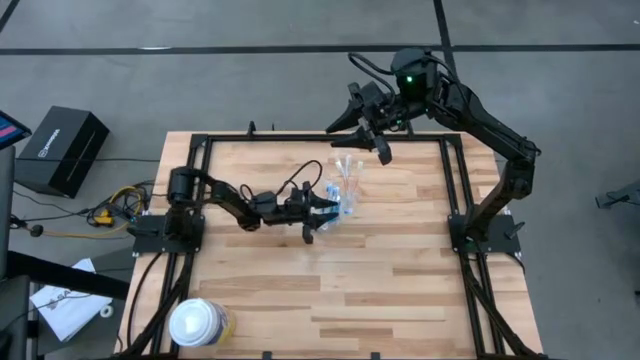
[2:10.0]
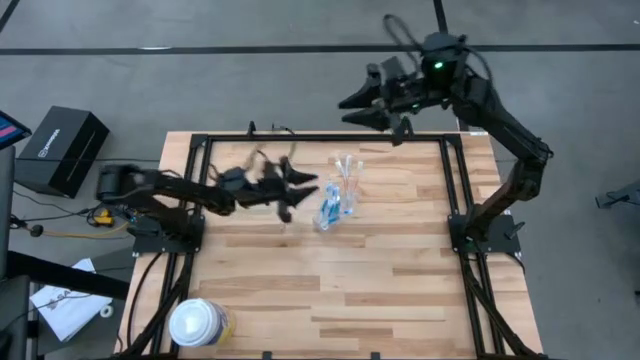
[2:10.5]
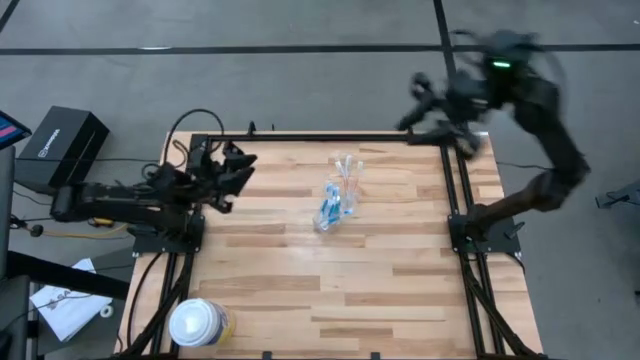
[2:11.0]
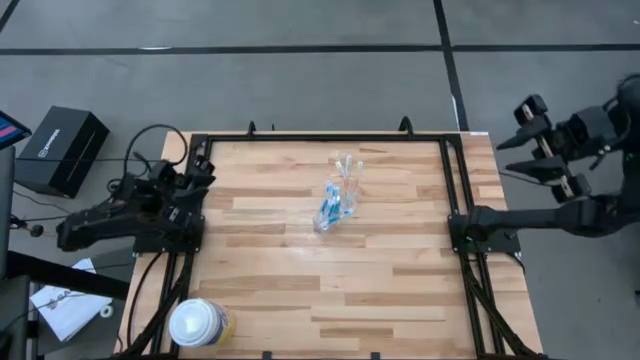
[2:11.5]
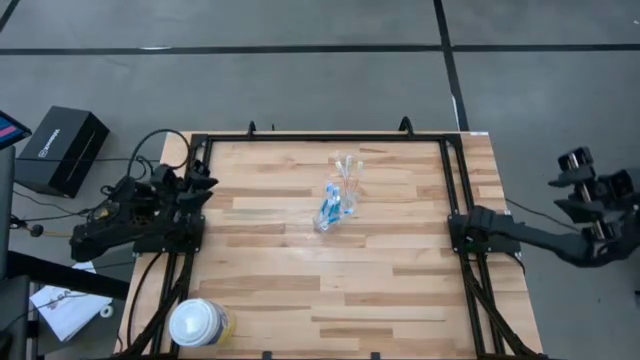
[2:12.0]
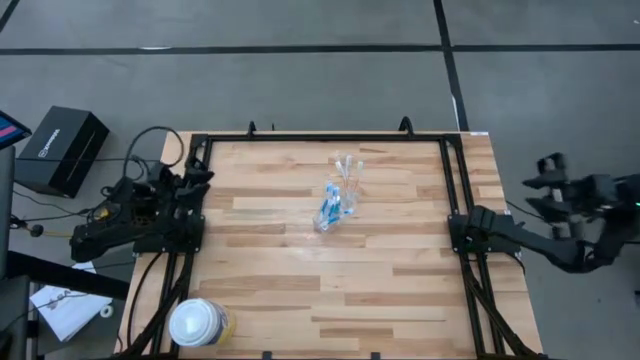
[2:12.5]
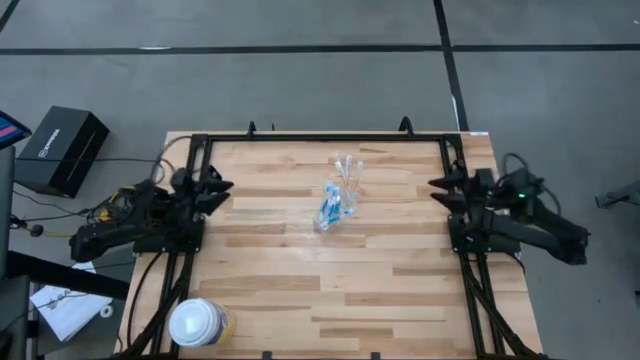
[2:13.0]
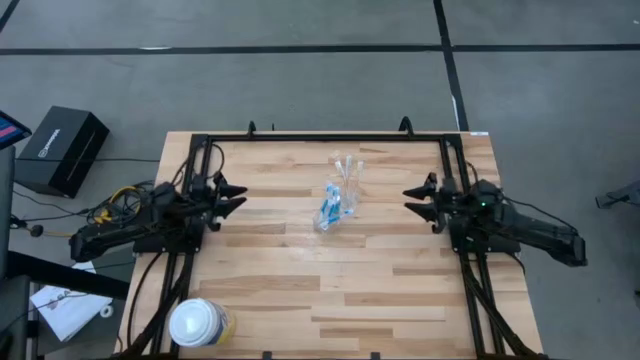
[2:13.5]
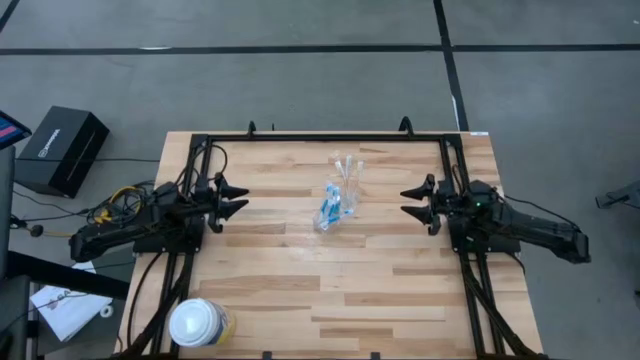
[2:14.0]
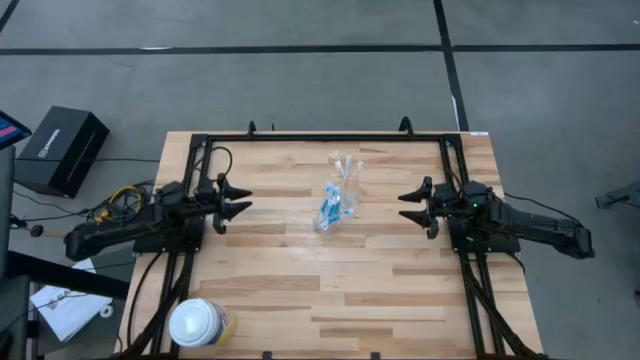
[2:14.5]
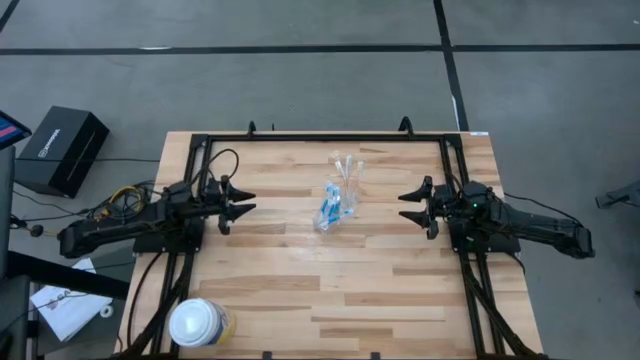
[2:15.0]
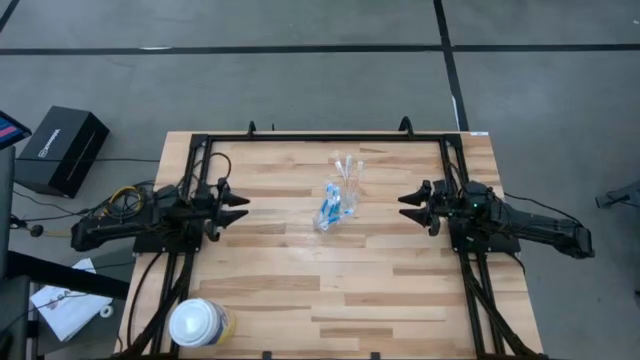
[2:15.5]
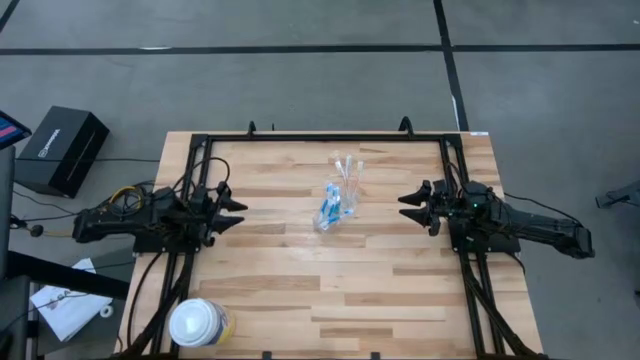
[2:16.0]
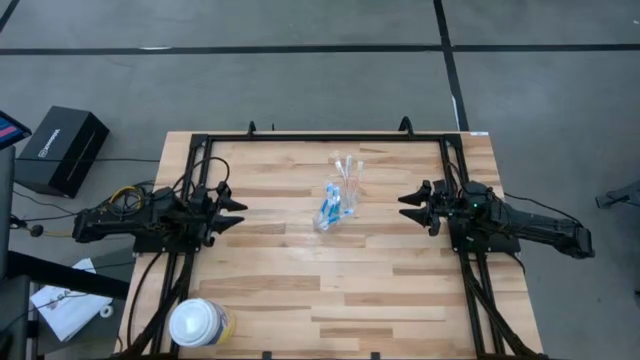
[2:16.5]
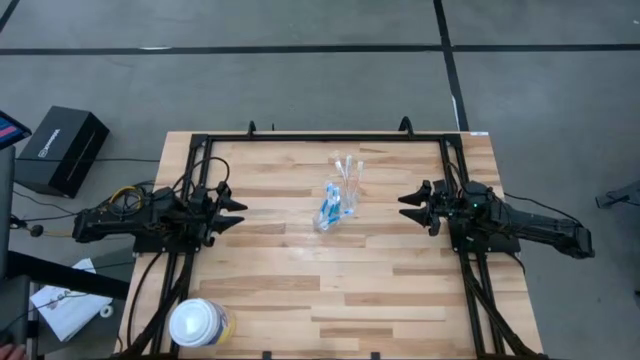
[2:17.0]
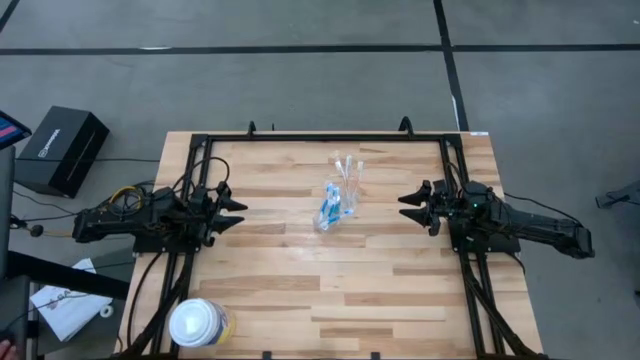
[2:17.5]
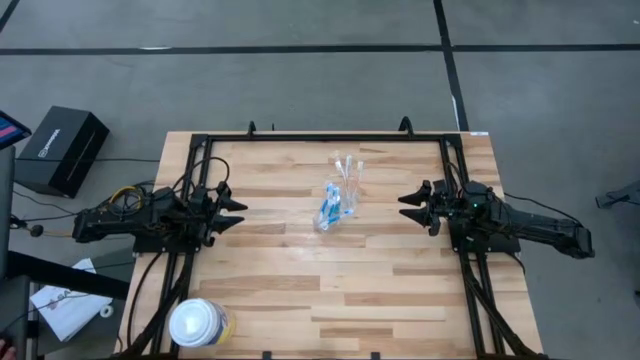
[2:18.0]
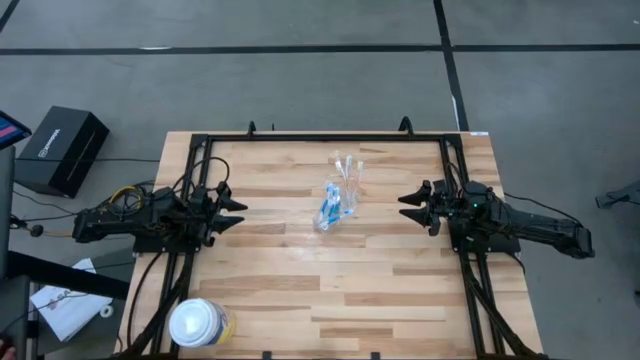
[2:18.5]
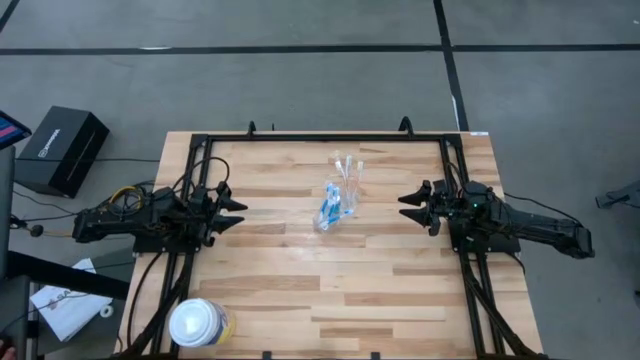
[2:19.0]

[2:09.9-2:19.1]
Task: Pick & Place toothbrushing station
Return to Home Position

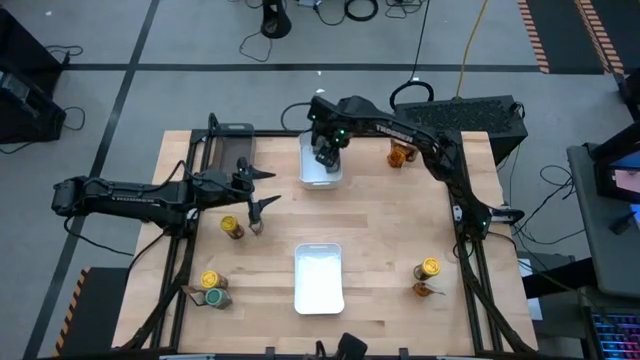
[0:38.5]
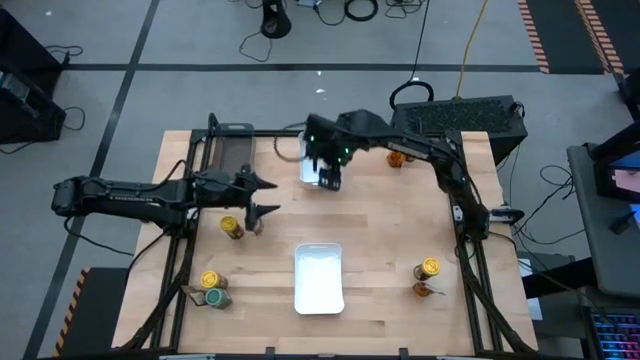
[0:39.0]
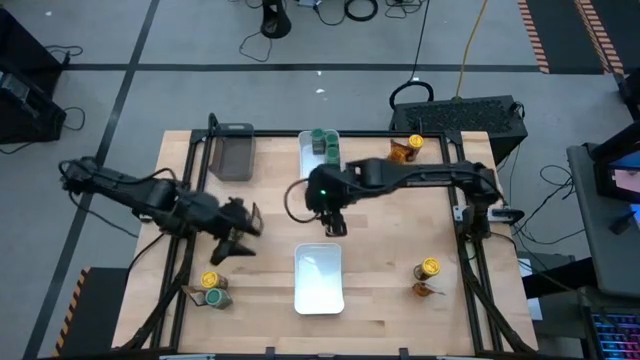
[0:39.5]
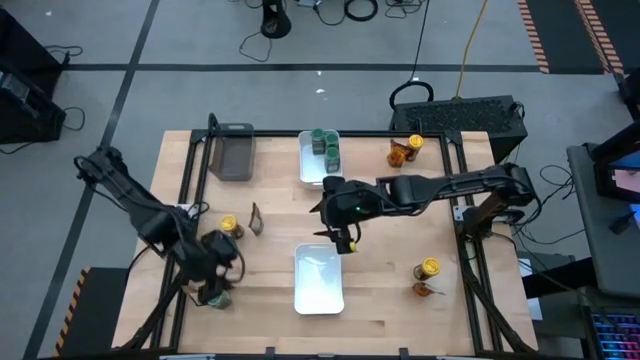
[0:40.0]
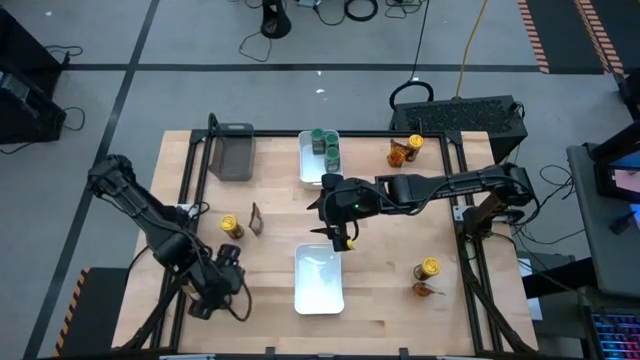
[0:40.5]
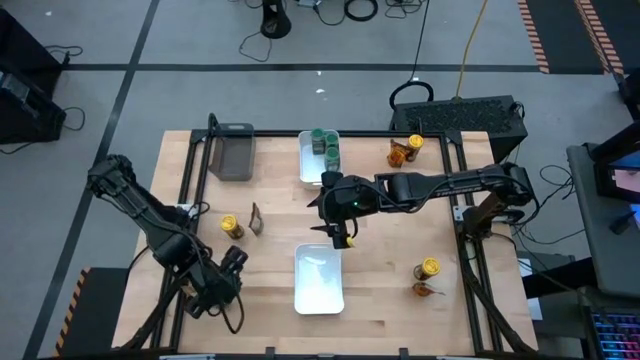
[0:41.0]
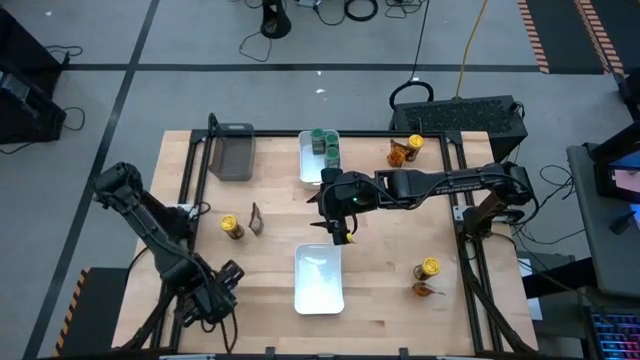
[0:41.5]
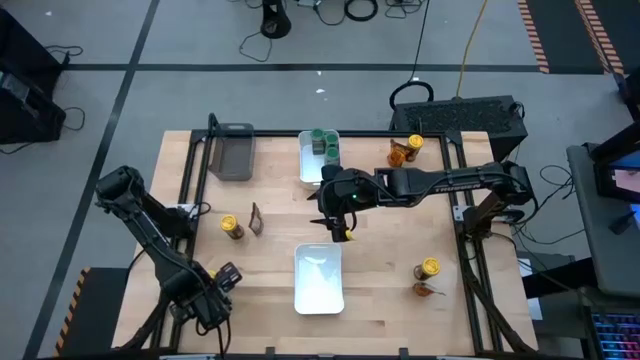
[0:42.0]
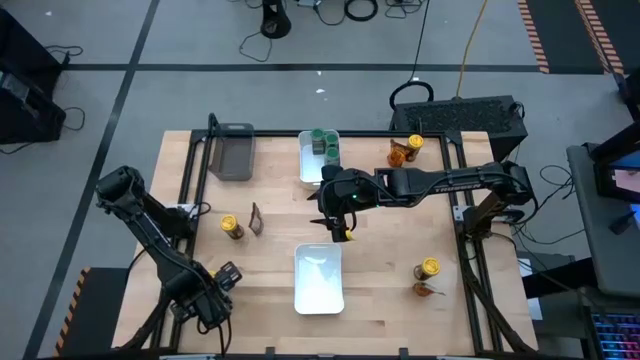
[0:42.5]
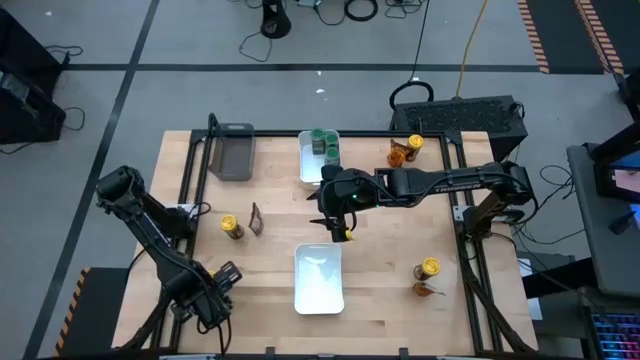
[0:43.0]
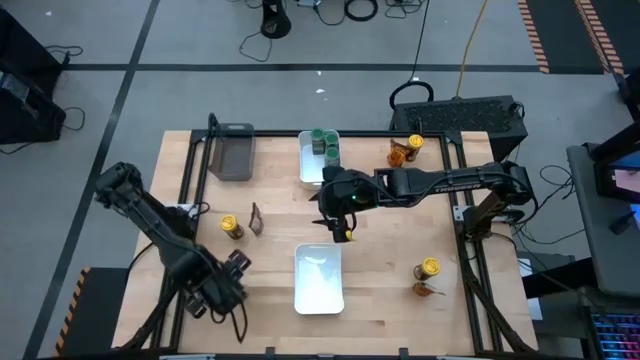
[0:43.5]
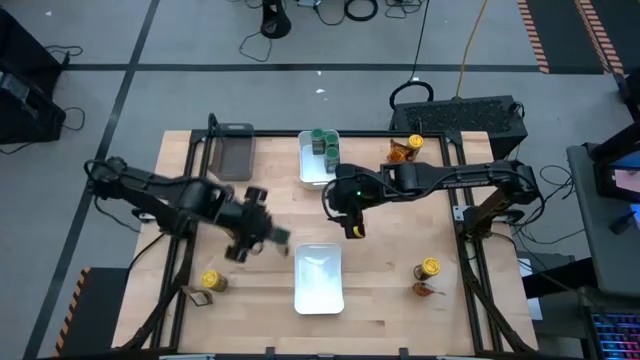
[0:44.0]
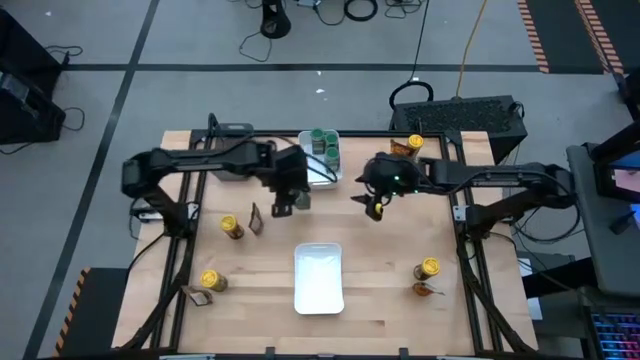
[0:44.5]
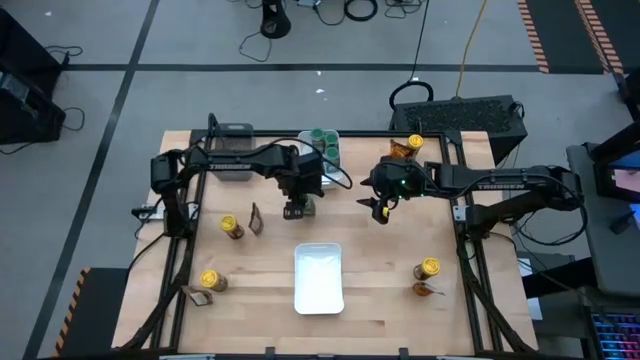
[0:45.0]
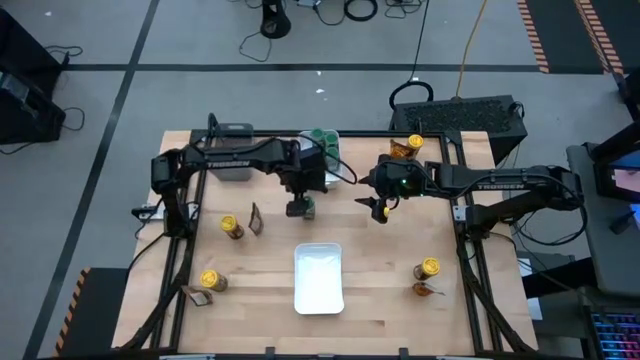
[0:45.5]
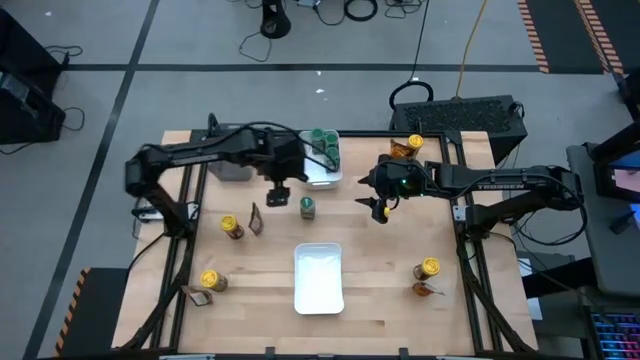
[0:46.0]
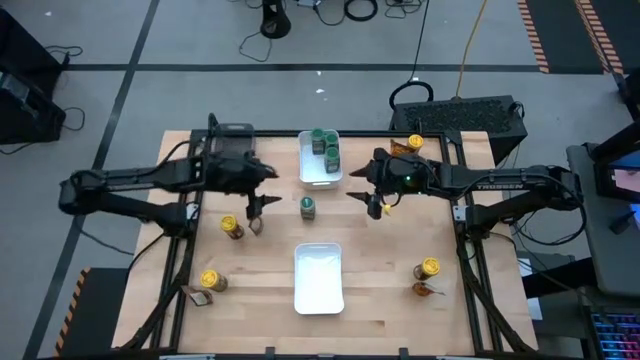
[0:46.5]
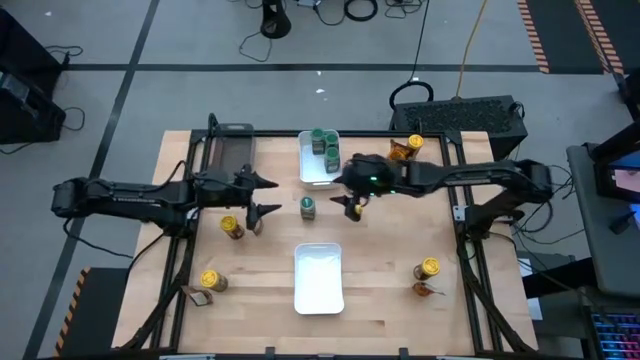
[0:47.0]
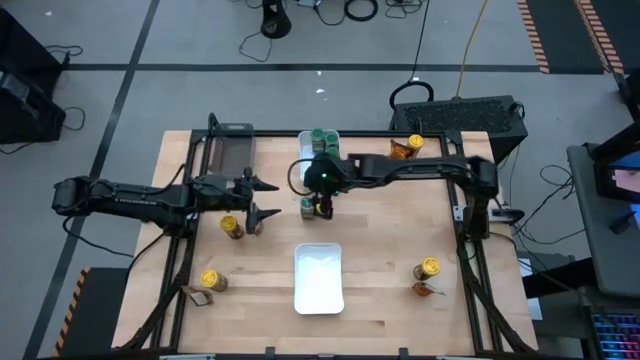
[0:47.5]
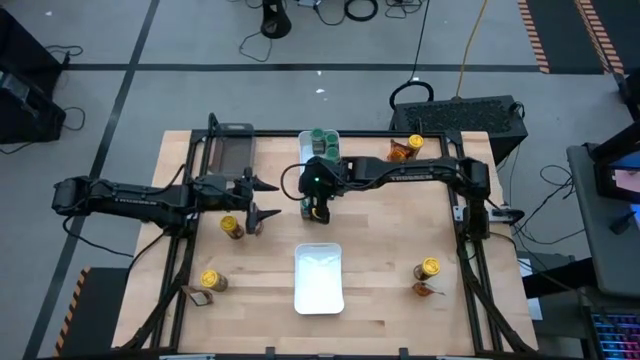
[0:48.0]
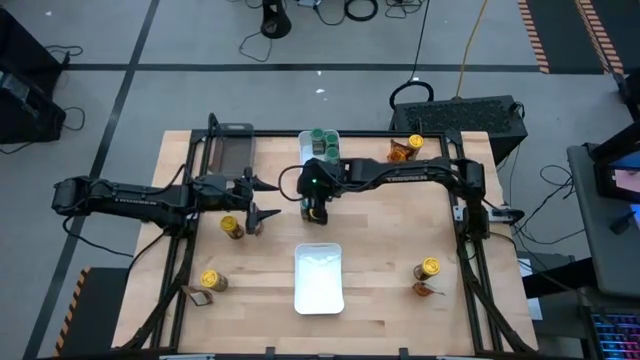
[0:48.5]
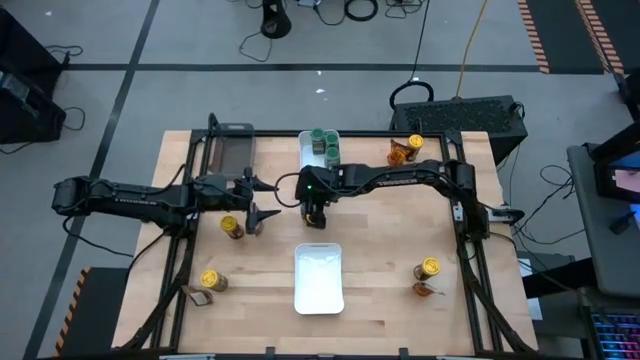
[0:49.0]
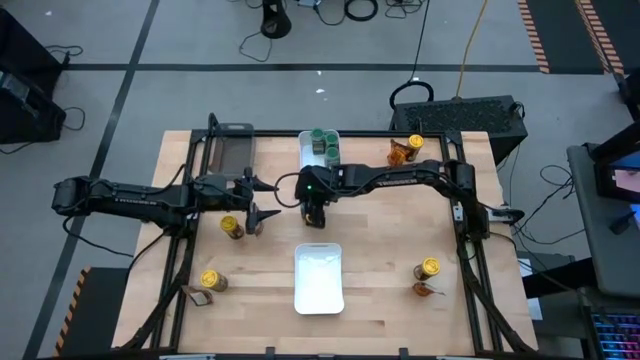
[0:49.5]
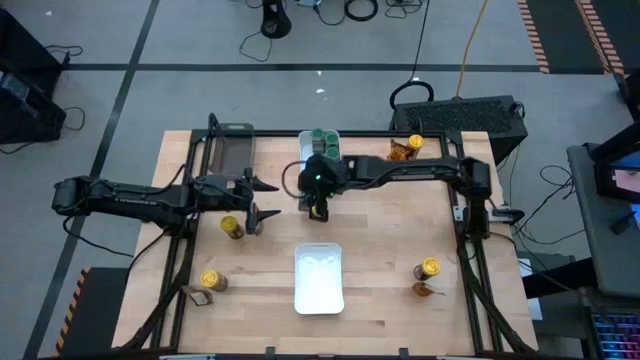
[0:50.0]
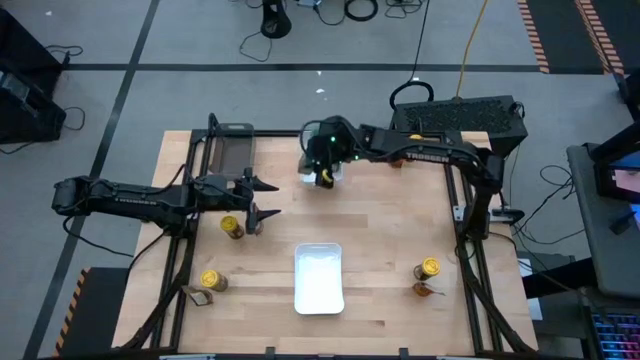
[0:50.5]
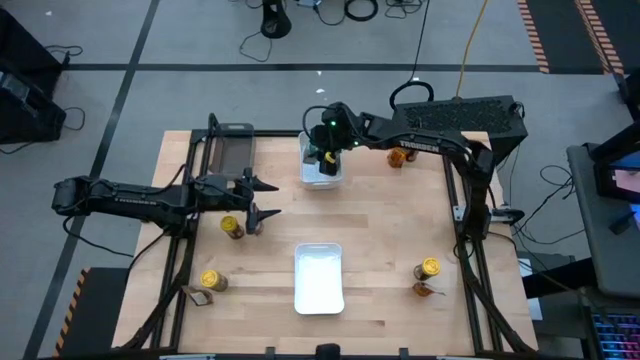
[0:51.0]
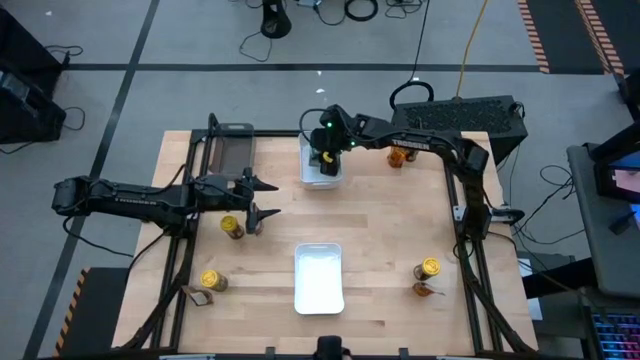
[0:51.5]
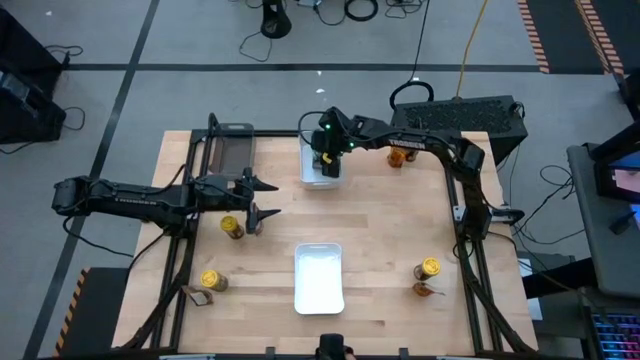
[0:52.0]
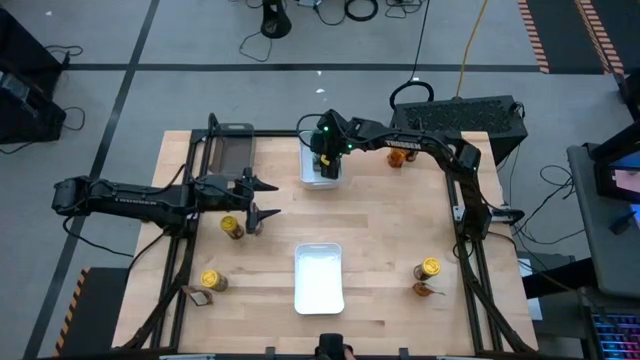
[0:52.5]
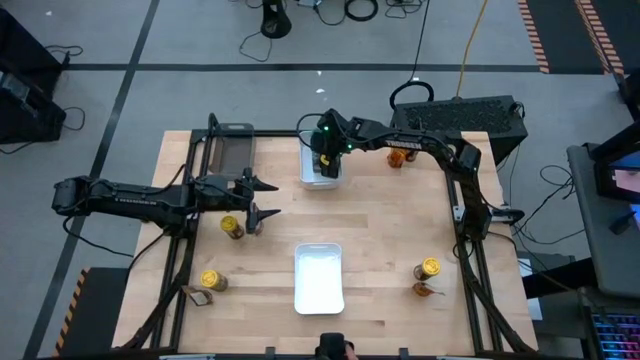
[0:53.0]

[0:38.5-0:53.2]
Task: Sort spices by type
Put the green spice bottle into the top white bin
